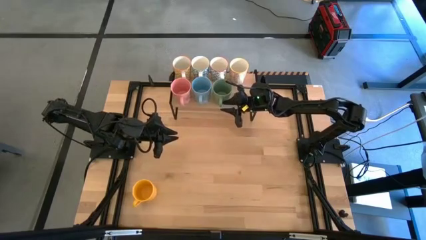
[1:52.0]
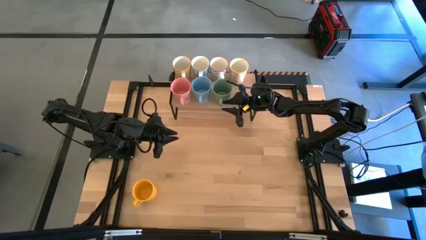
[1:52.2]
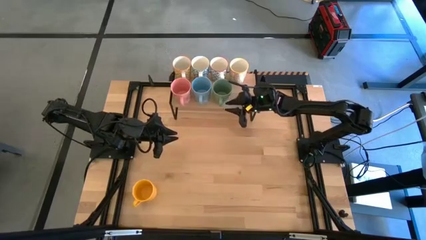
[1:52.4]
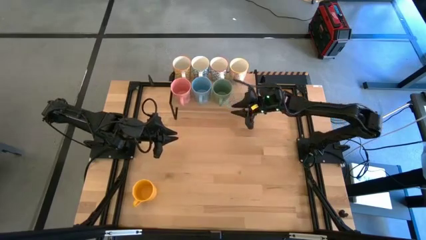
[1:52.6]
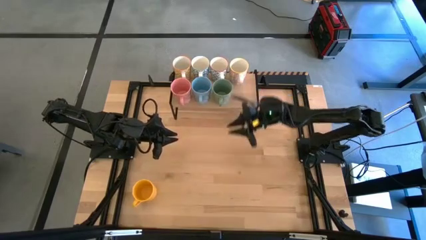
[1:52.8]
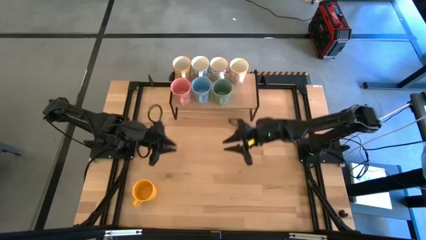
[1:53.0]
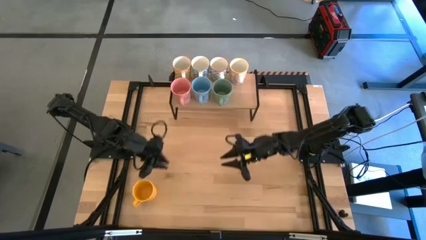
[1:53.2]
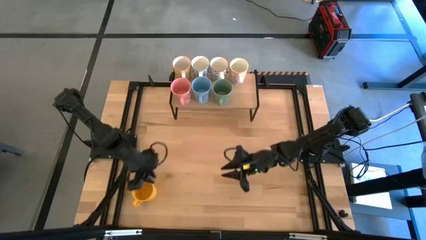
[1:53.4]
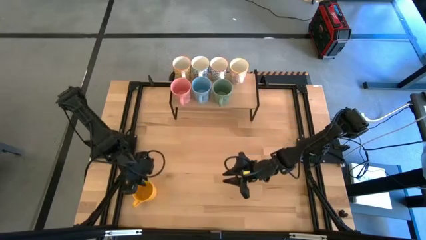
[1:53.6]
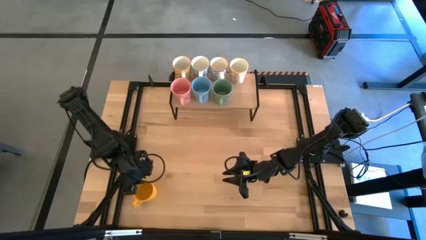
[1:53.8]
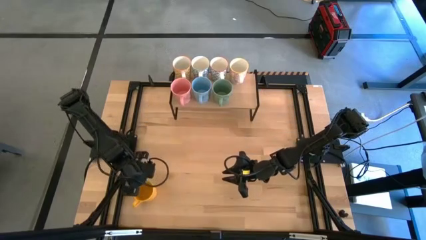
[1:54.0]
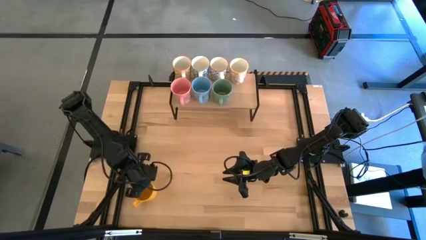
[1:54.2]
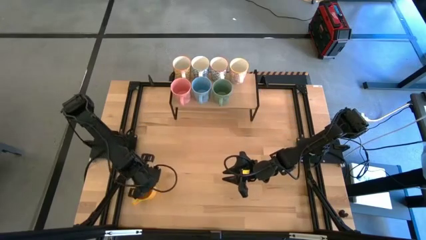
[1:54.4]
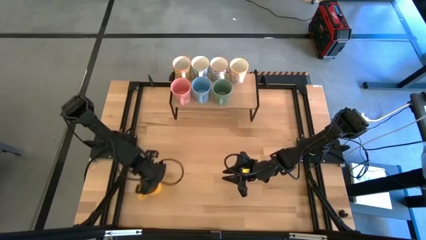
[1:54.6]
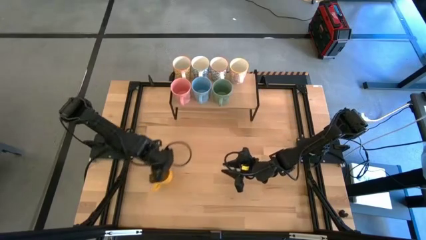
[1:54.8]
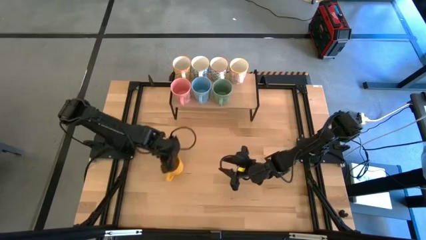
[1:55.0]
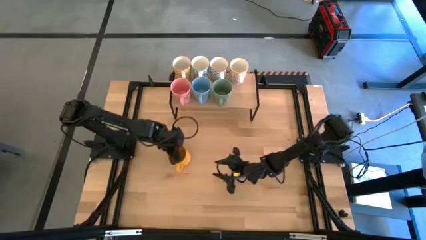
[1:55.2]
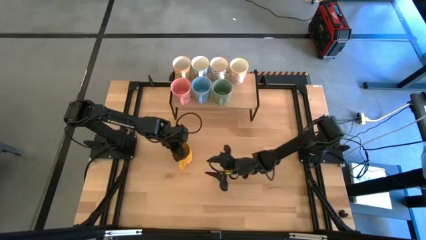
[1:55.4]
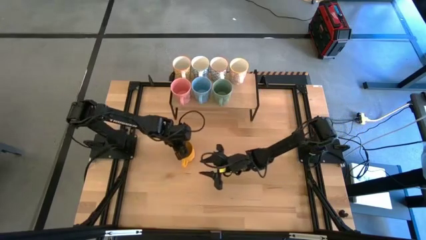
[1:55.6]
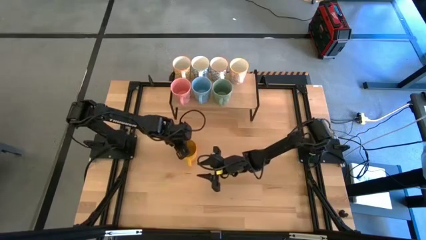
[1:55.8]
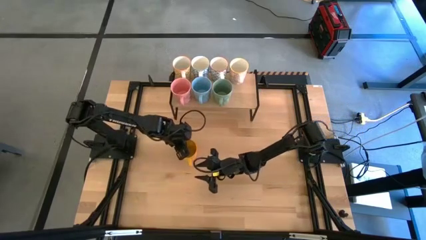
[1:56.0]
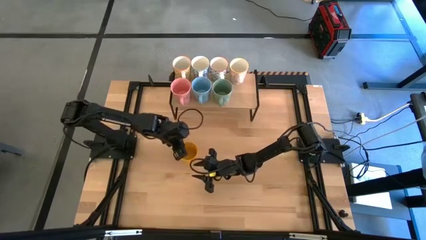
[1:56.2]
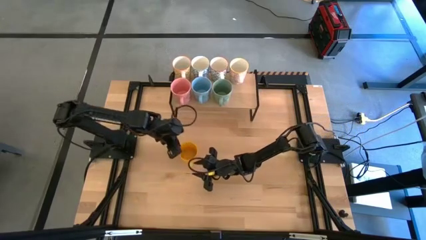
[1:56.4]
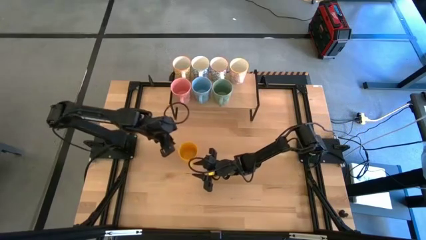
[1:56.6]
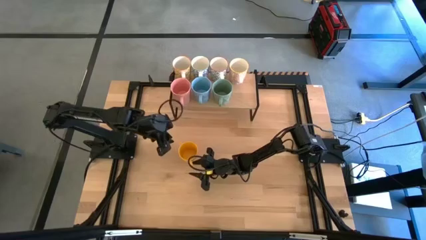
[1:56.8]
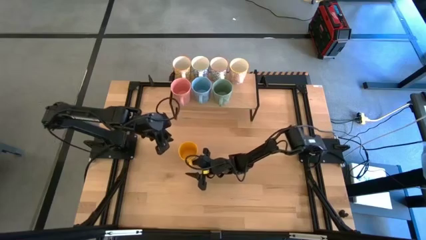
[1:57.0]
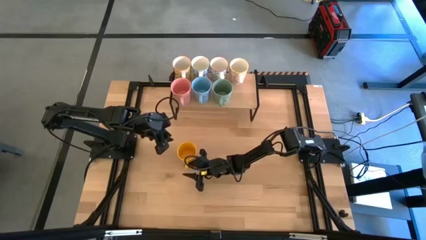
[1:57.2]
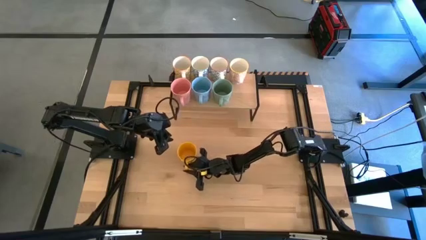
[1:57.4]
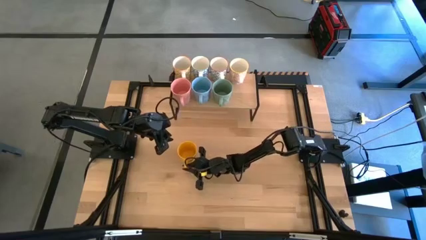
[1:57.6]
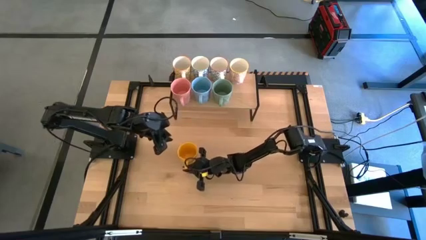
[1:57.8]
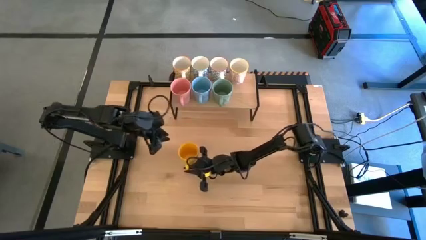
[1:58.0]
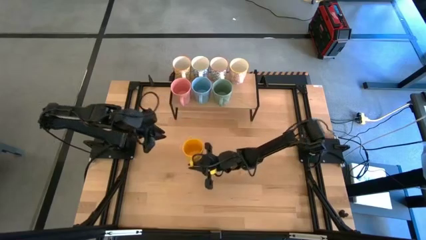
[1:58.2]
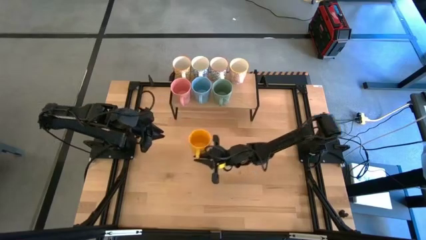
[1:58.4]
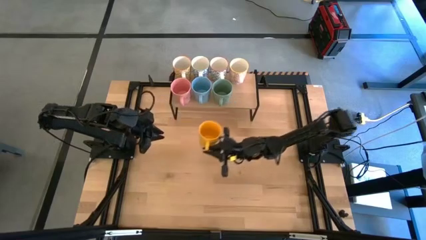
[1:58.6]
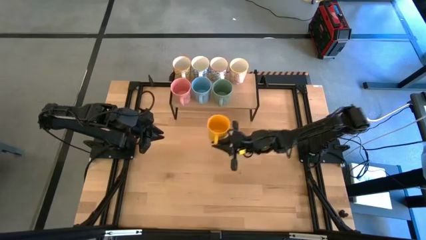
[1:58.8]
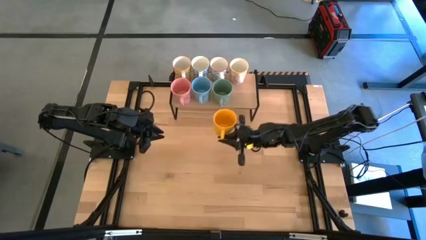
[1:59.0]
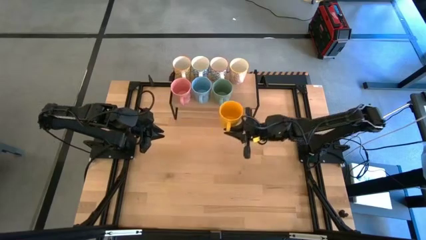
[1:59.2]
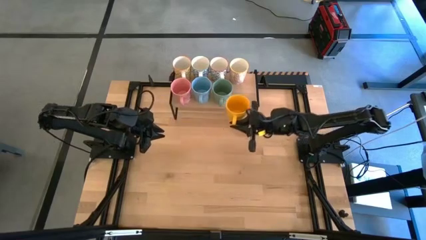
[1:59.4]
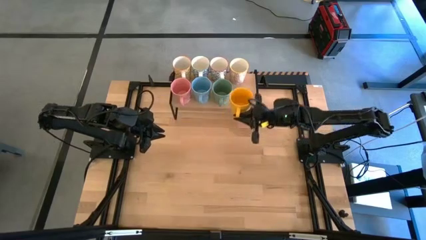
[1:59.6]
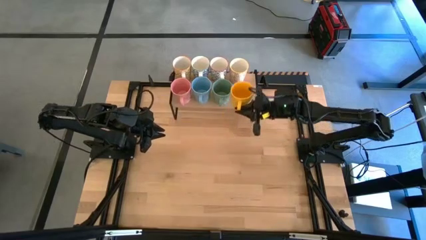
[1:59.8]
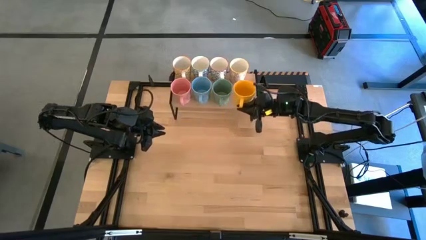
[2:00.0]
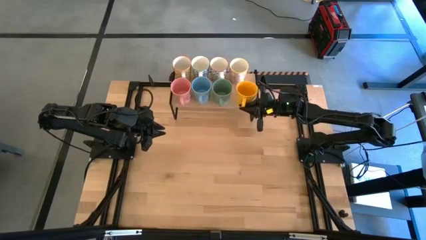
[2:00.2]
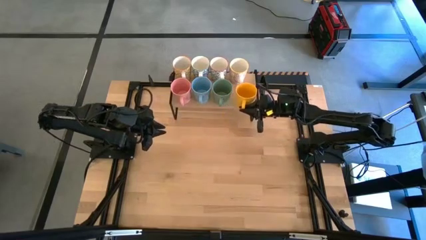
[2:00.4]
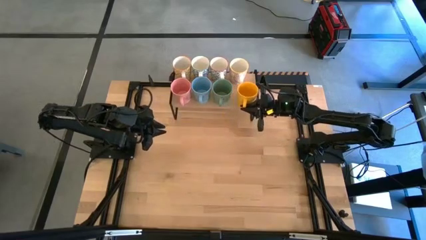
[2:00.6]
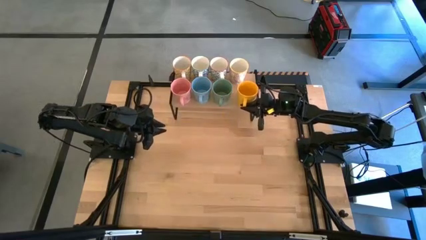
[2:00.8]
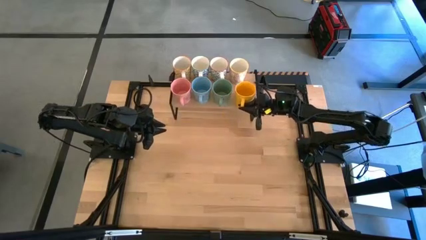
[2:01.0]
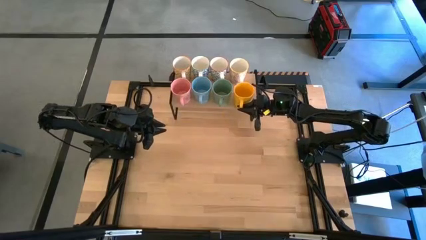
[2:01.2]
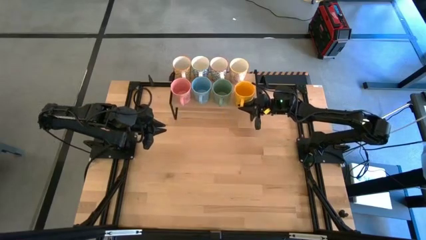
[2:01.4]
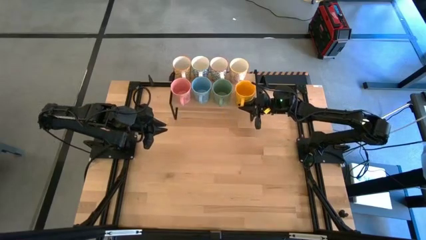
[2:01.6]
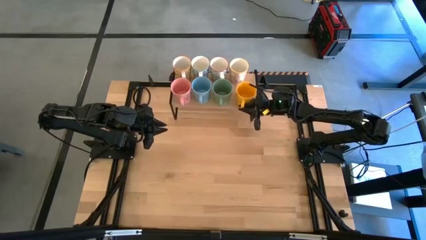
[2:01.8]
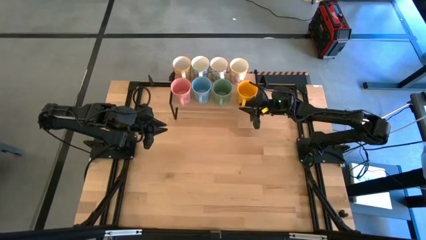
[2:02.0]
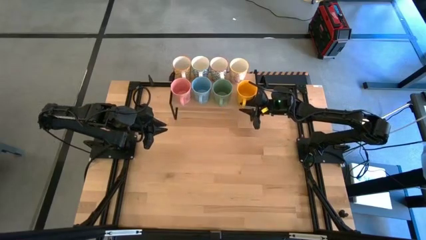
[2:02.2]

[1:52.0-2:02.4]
Task: Place coffee mugs
Put the yellow mug on the shelf

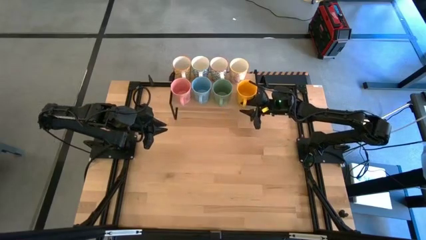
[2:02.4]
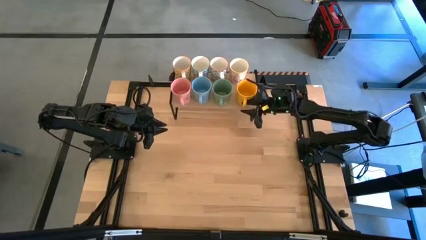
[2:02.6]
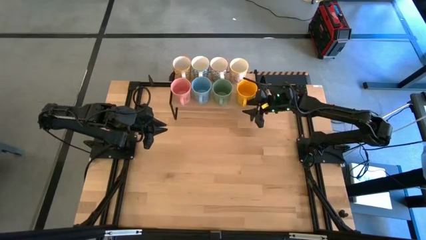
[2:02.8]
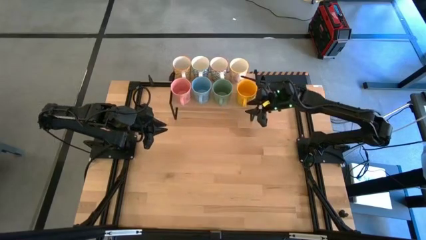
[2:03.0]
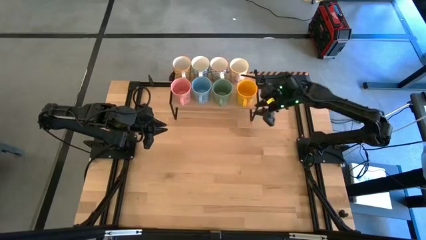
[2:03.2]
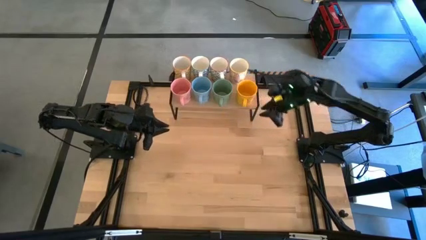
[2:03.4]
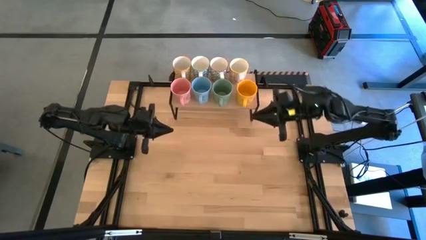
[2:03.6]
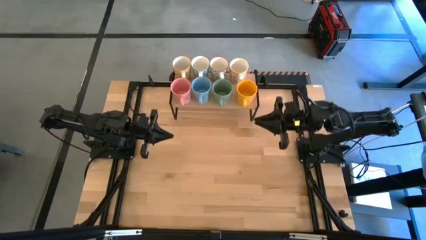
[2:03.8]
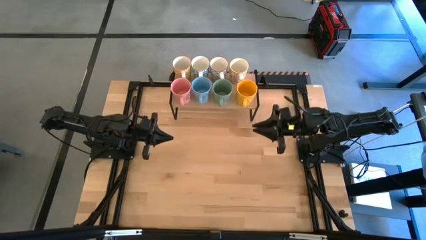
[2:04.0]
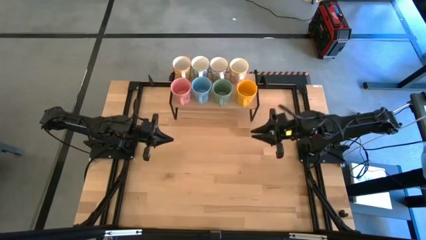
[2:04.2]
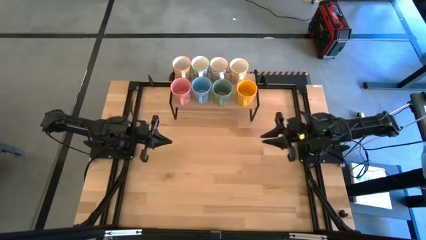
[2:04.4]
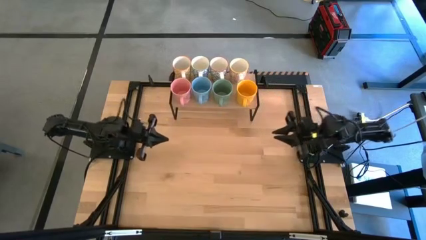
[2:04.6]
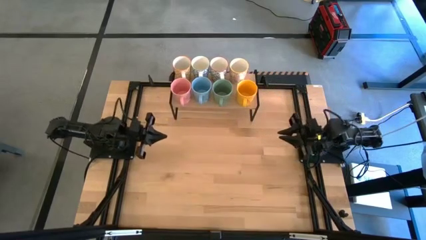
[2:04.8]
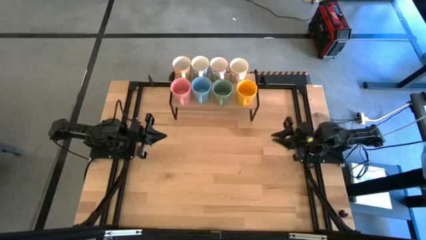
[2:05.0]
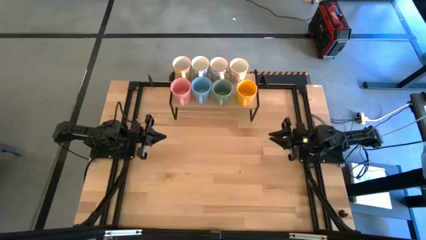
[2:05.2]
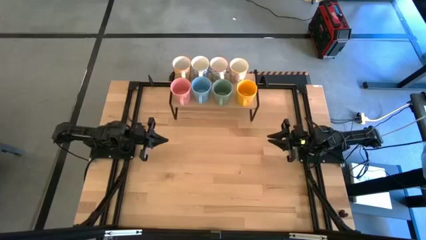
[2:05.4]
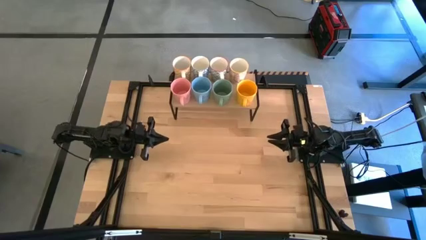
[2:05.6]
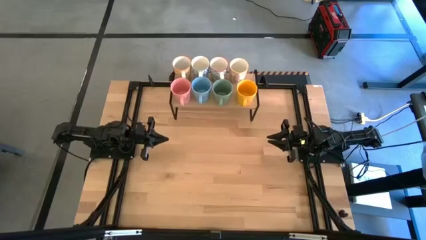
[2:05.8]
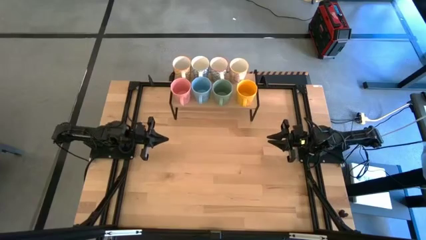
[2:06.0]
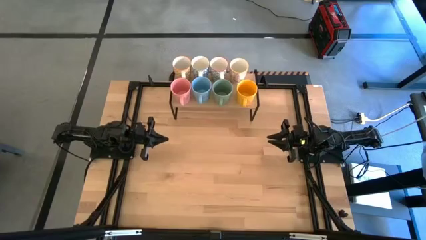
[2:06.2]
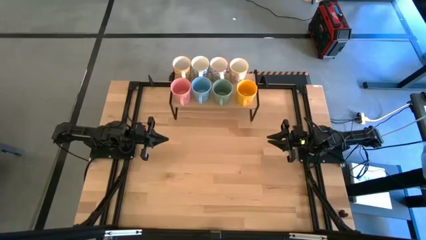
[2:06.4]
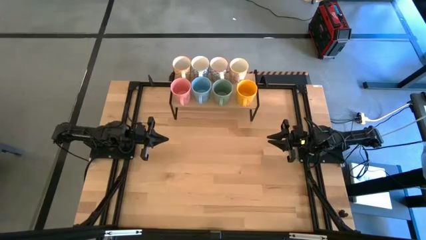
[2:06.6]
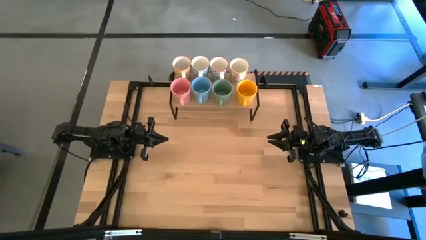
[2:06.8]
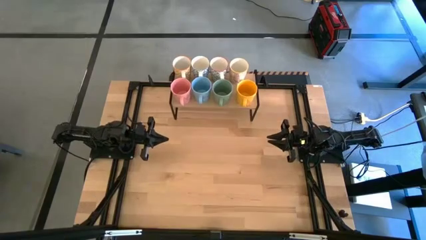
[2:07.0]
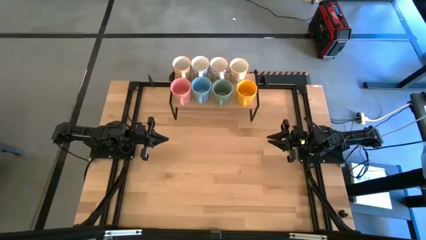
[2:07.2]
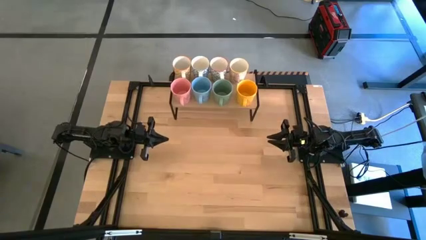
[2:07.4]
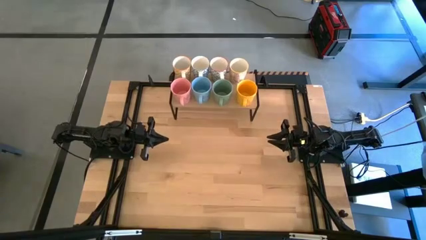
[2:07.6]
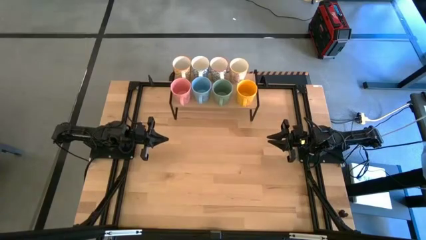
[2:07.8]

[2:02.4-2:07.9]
Return to Home Position
